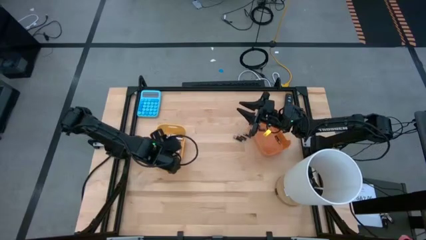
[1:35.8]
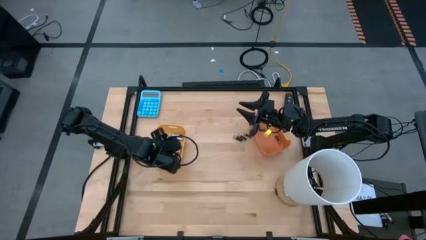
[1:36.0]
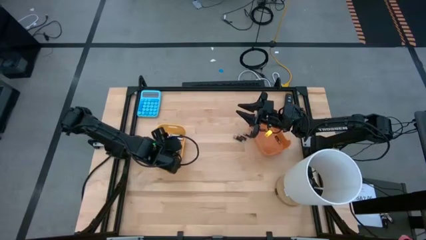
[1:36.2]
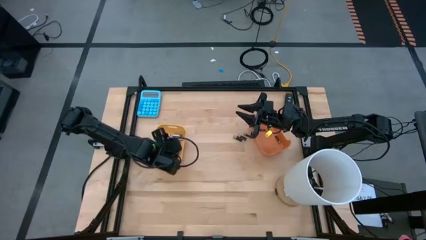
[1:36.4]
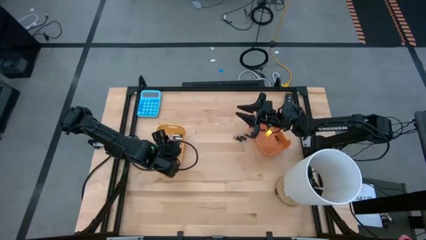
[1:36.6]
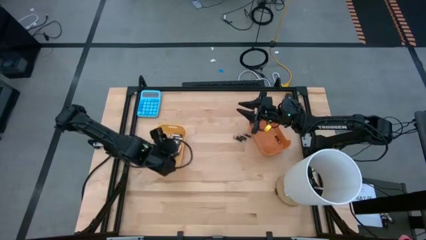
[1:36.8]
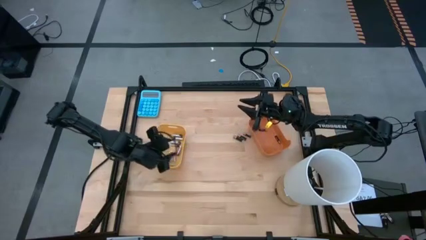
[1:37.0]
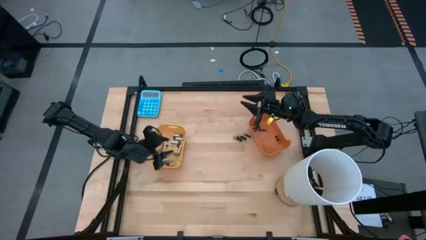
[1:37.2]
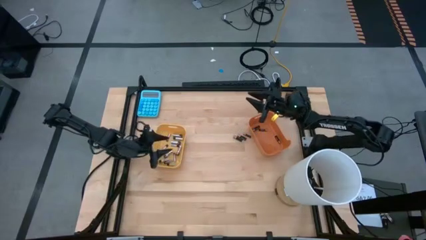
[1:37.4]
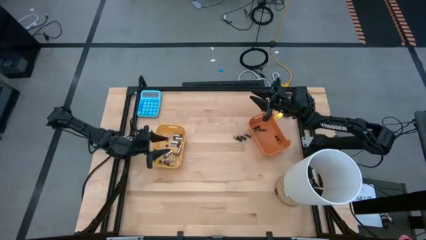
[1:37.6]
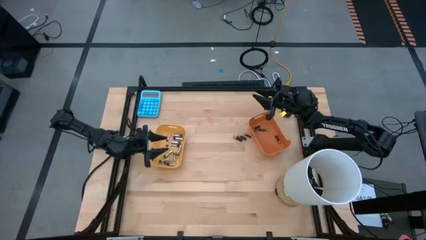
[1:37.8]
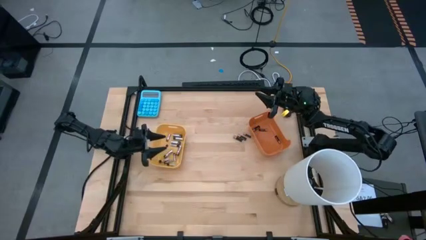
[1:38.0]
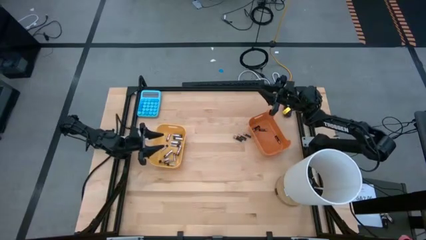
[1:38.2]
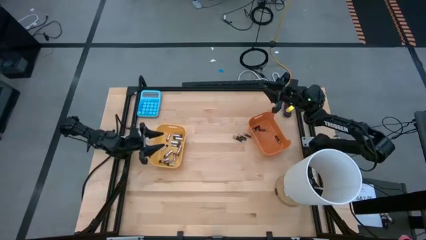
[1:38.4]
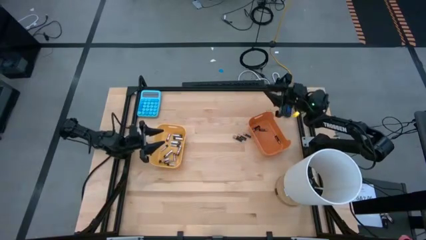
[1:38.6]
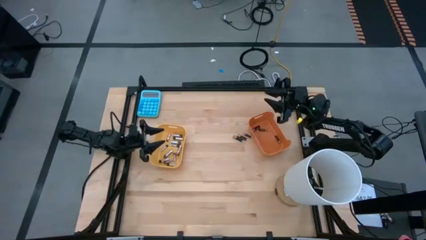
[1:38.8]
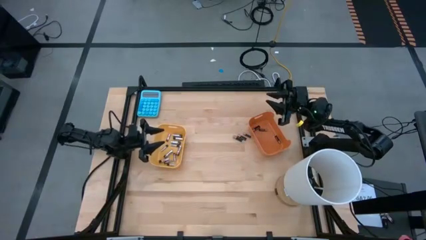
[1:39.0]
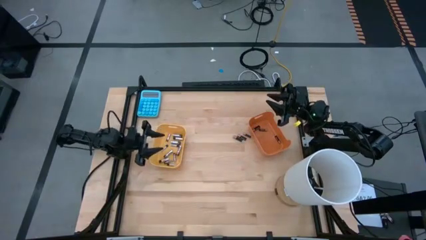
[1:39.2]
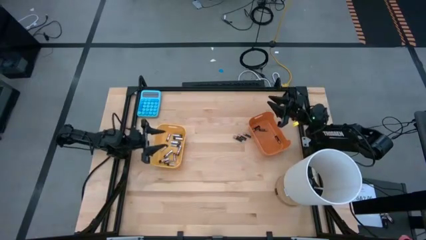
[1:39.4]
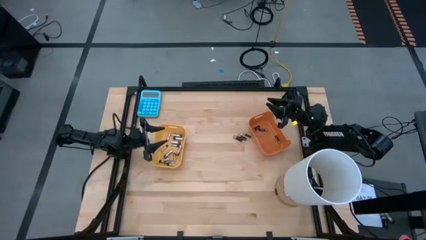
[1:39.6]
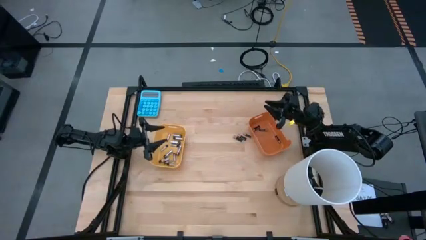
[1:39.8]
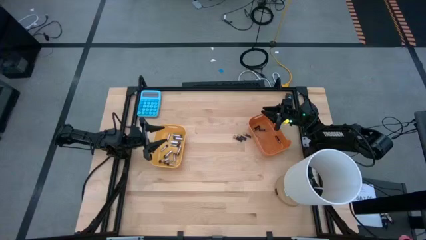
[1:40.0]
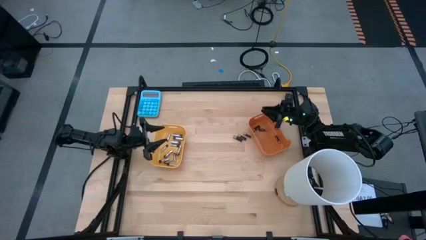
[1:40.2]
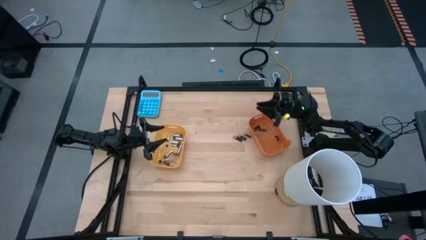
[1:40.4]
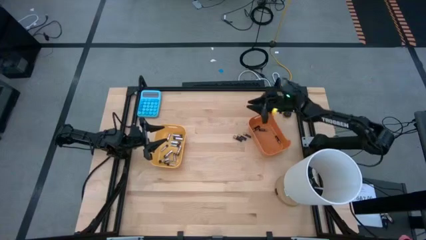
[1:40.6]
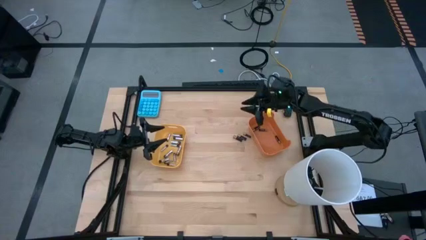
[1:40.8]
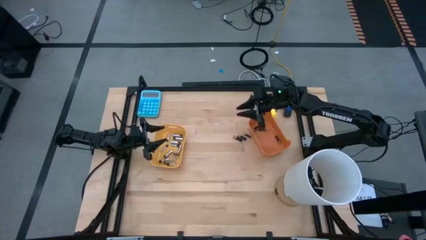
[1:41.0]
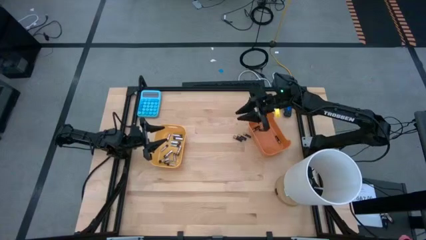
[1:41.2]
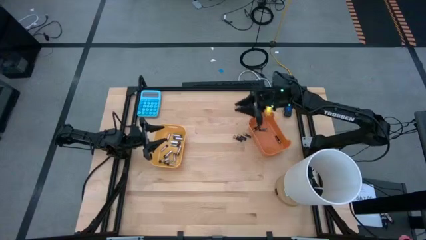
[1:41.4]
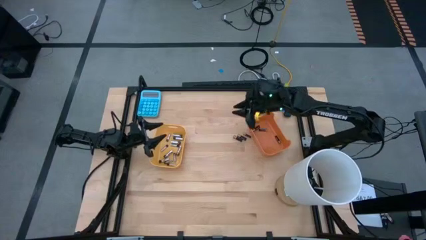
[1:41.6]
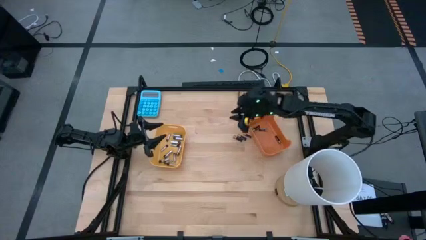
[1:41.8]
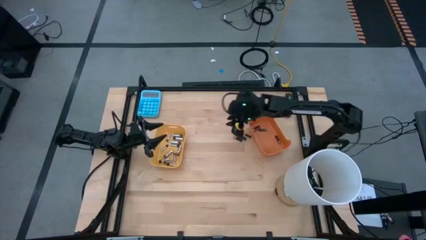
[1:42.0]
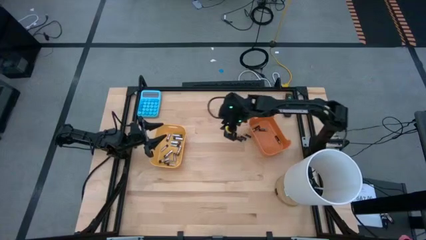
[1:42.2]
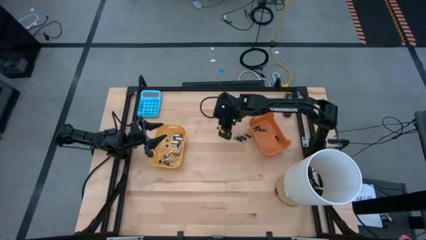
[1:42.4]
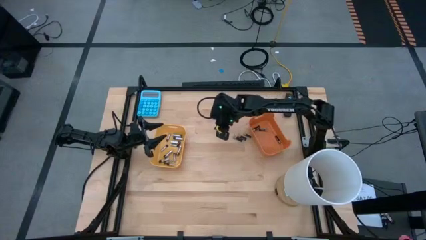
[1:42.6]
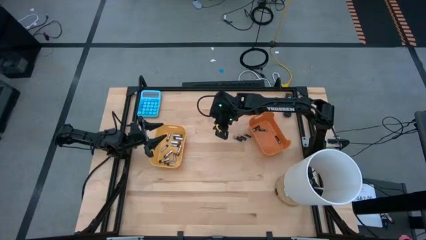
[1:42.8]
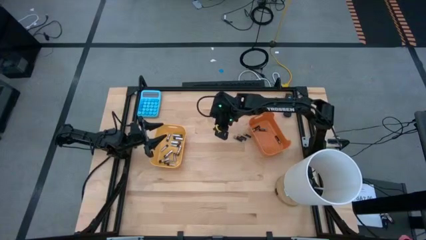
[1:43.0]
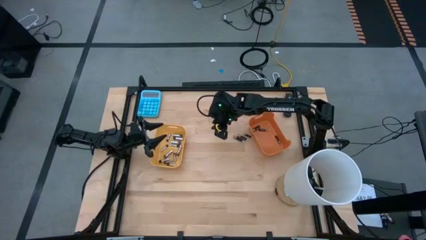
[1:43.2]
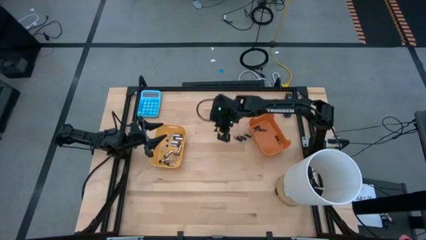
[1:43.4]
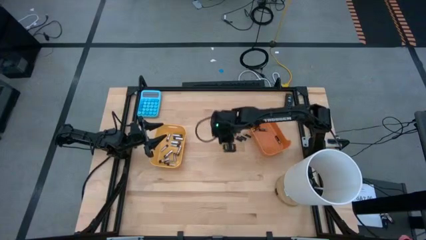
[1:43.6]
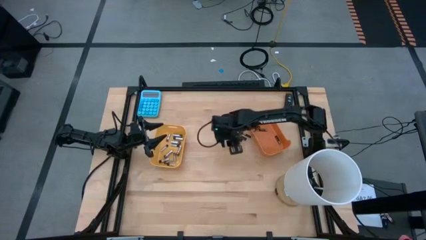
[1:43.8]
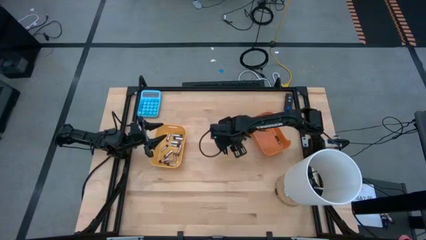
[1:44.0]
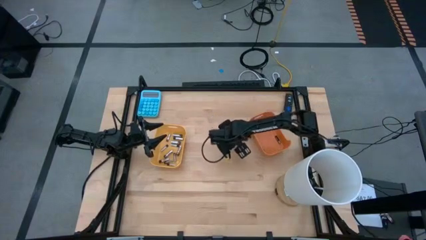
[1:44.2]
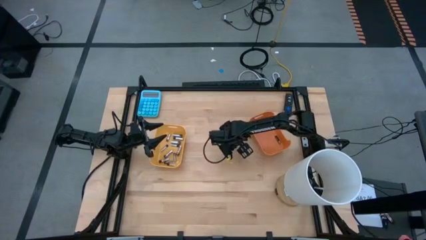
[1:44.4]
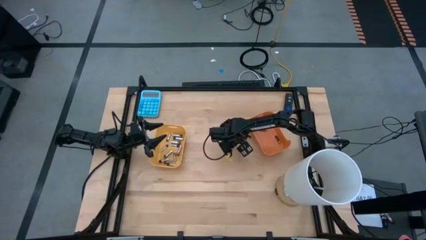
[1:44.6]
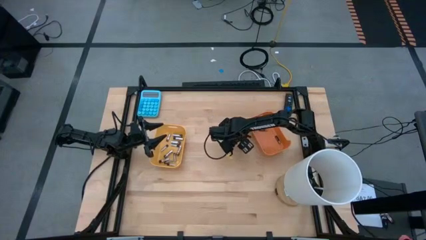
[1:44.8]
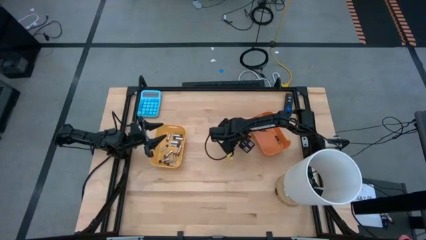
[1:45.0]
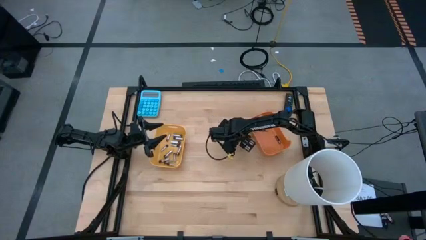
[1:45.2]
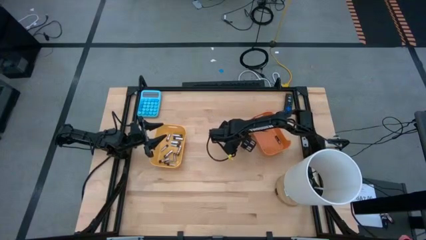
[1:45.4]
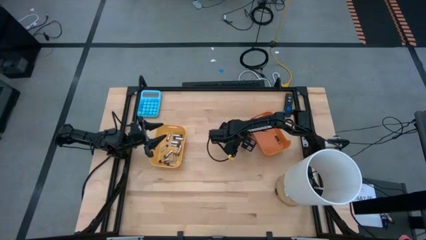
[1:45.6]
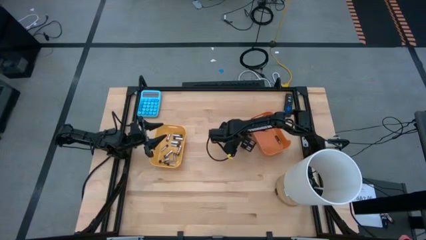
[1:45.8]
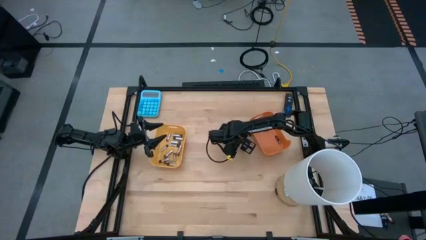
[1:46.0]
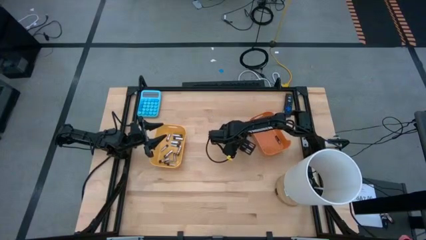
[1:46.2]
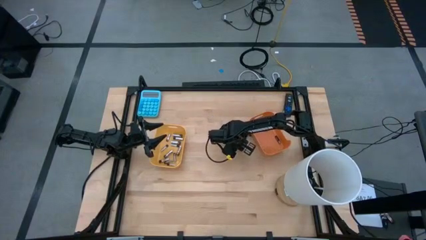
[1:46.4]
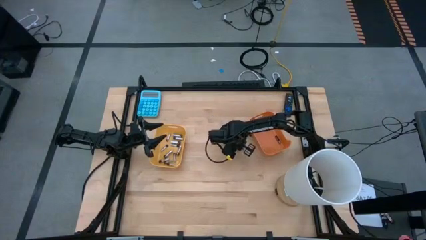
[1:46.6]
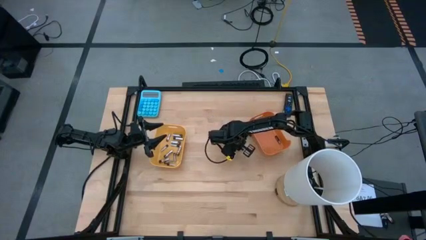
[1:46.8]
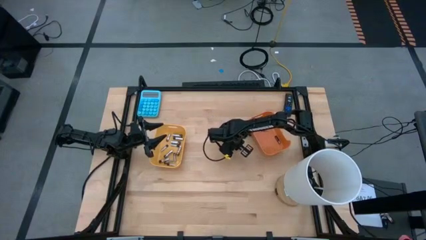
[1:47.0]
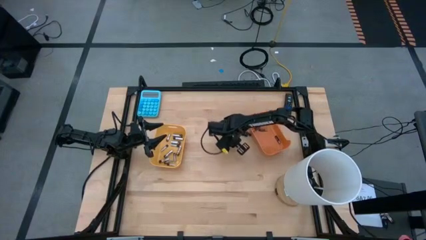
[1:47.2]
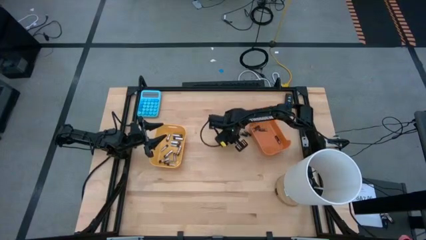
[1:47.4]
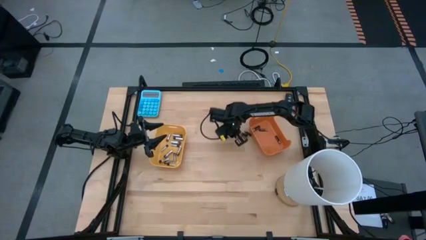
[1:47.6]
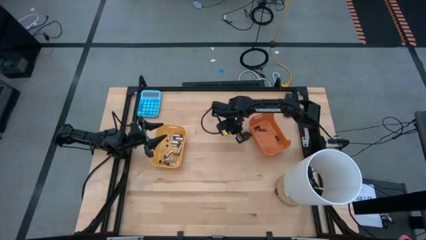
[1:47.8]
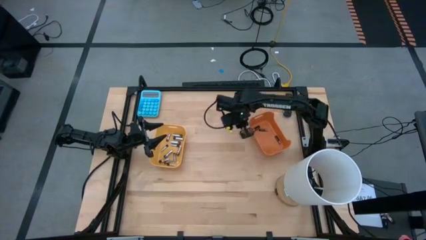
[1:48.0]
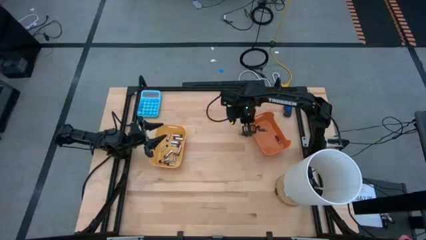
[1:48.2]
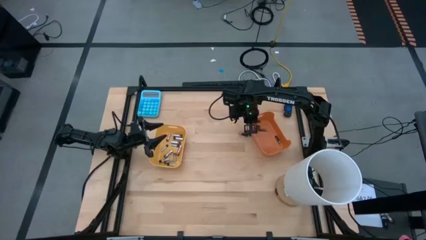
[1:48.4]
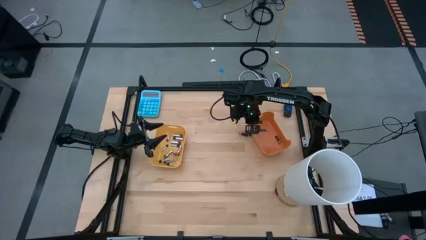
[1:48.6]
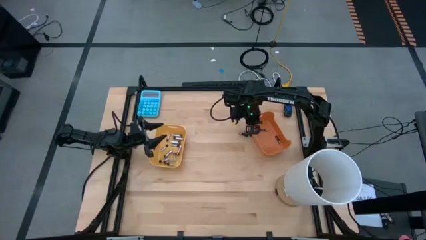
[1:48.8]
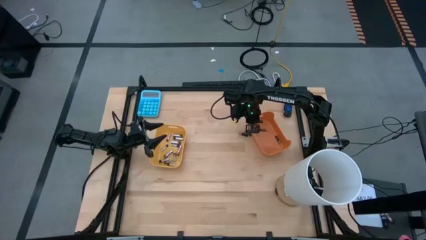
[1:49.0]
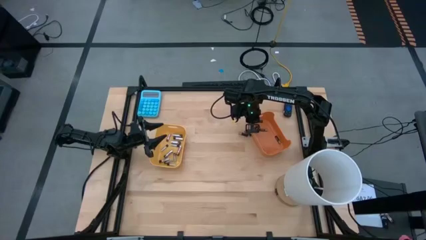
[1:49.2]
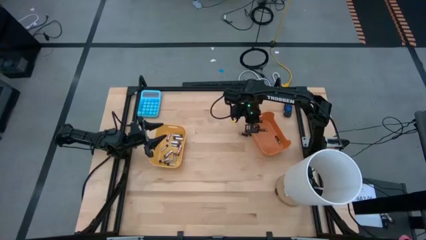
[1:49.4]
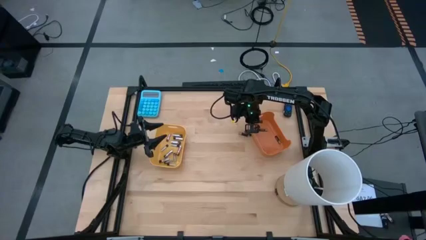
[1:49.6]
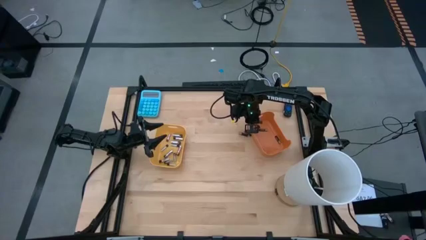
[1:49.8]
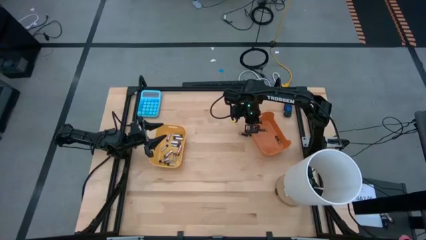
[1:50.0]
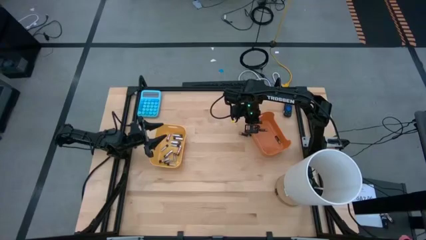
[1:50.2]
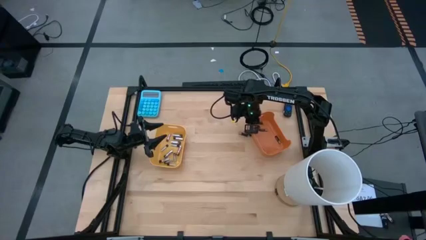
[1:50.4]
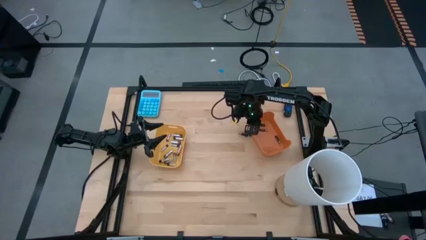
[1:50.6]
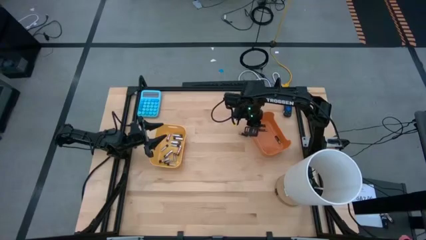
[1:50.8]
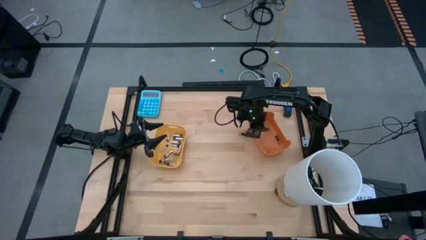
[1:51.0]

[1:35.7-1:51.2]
Task: Sort batteries
Put the black battery into the orange bin

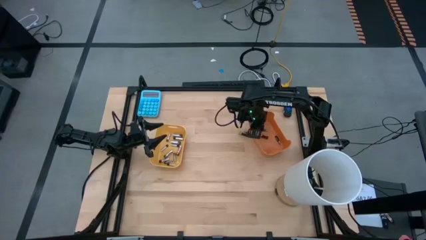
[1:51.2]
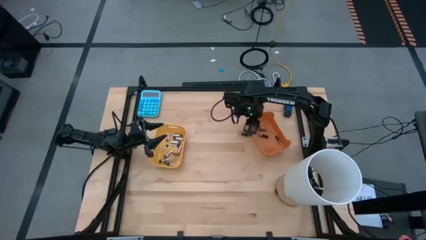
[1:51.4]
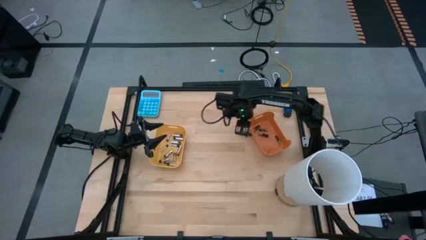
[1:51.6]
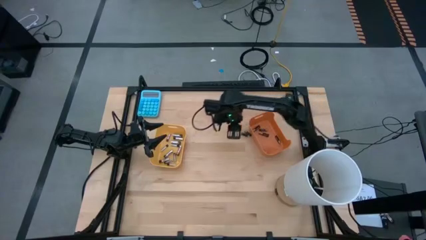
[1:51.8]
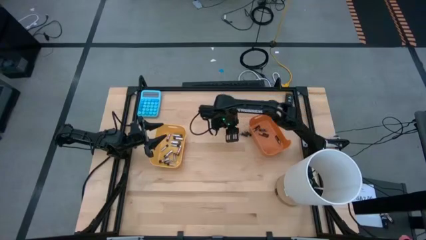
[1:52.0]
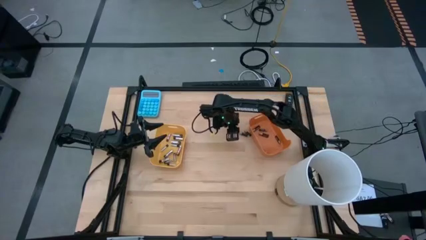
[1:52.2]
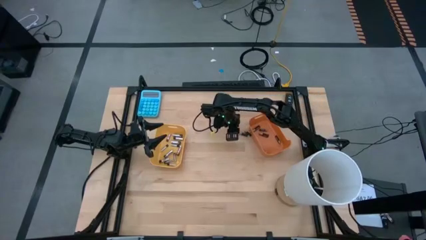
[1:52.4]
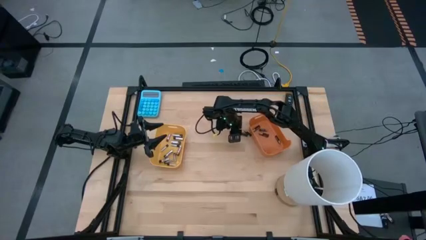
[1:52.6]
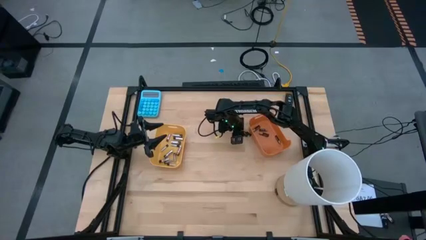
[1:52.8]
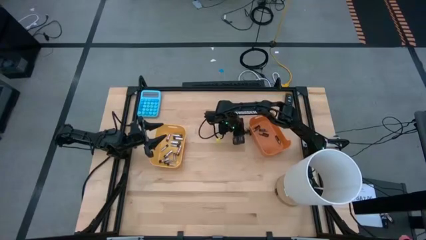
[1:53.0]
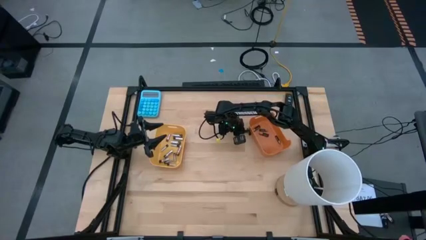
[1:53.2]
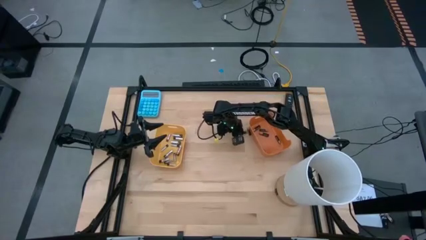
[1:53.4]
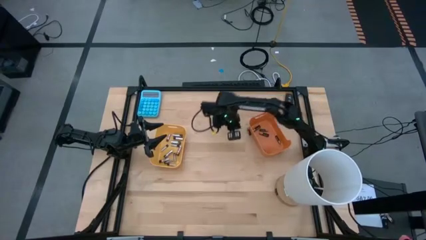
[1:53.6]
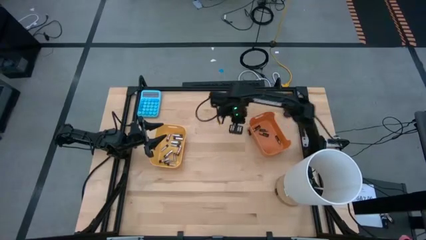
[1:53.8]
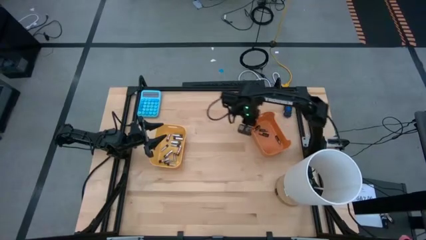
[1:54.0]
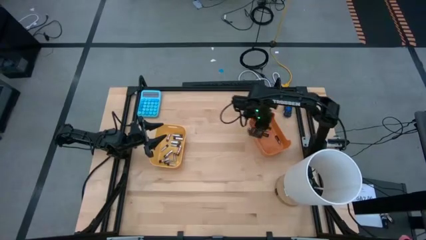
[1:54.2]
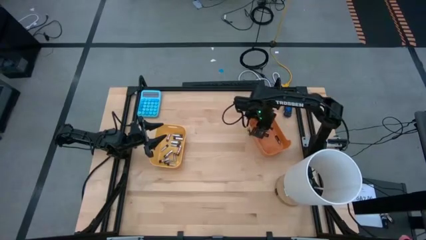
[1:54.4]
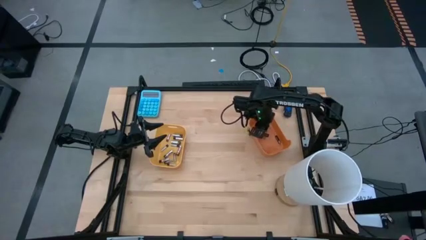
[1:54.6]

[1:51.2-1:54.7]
Put the black battery into the orange bin
